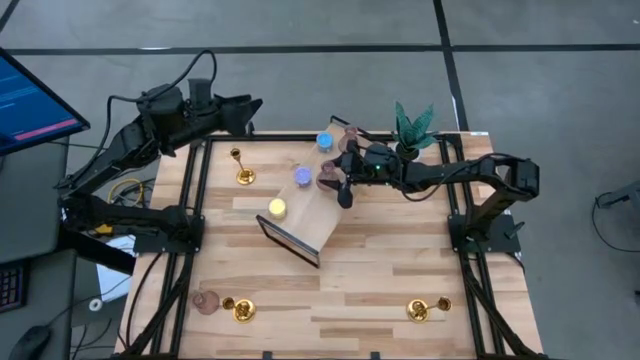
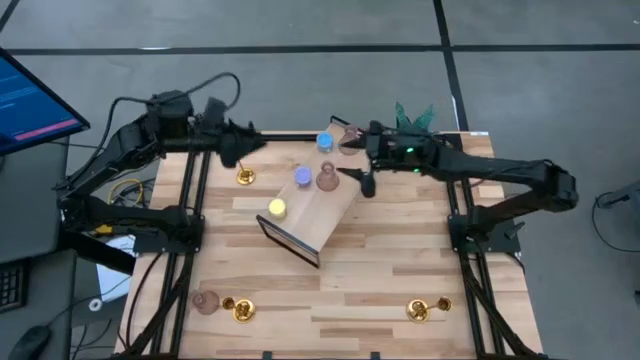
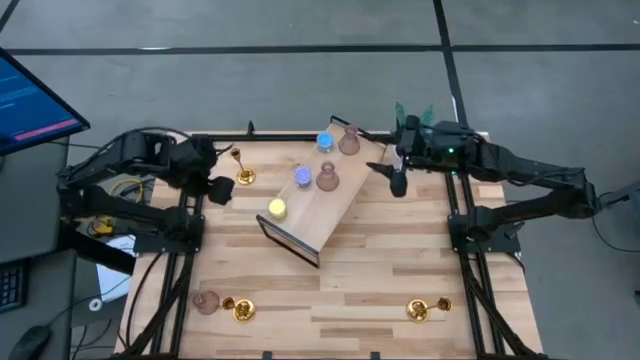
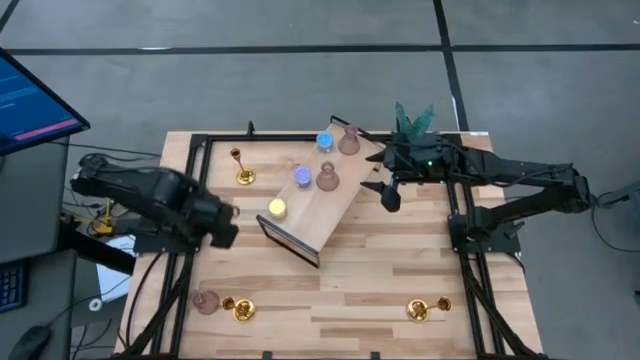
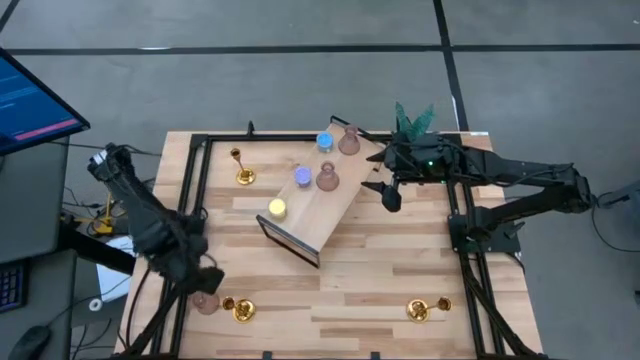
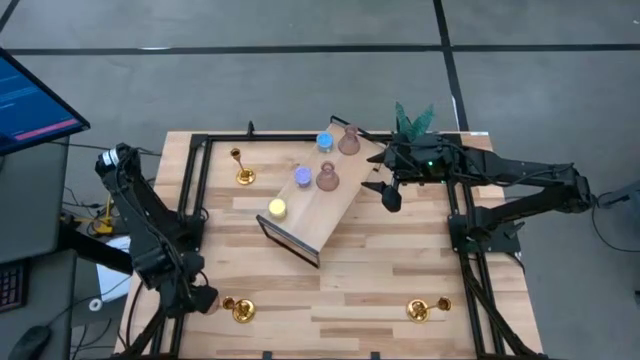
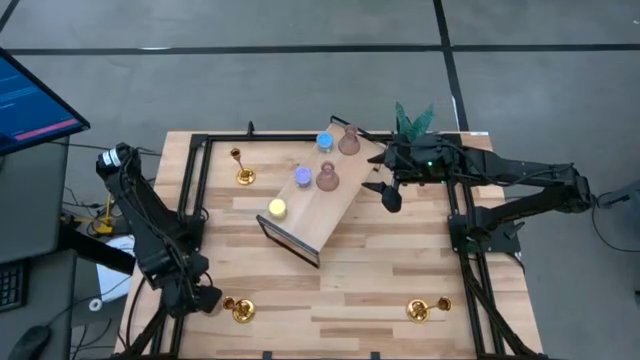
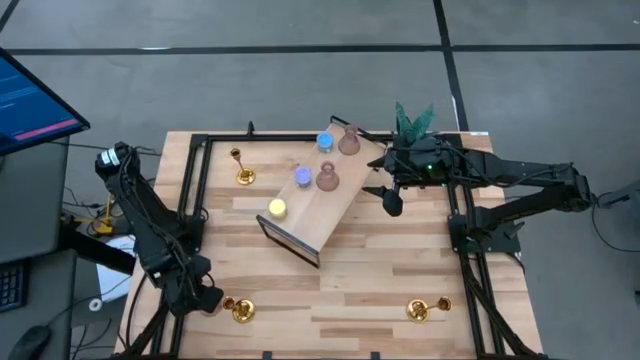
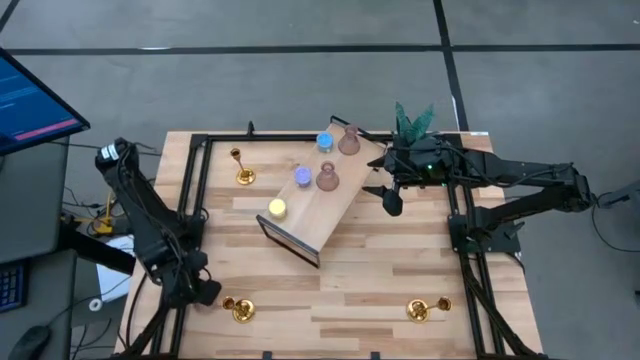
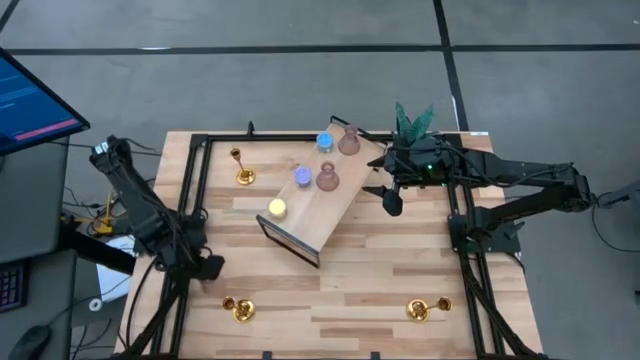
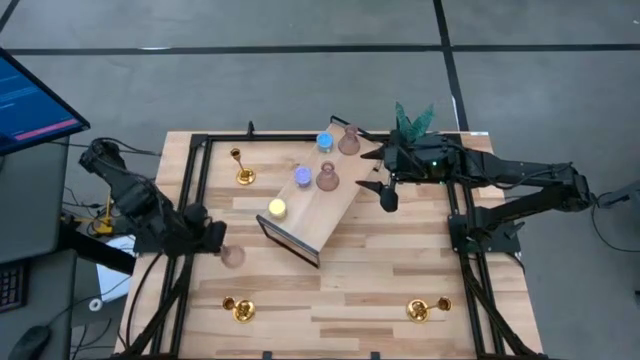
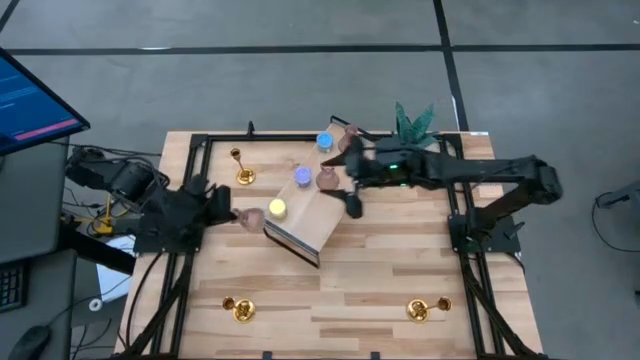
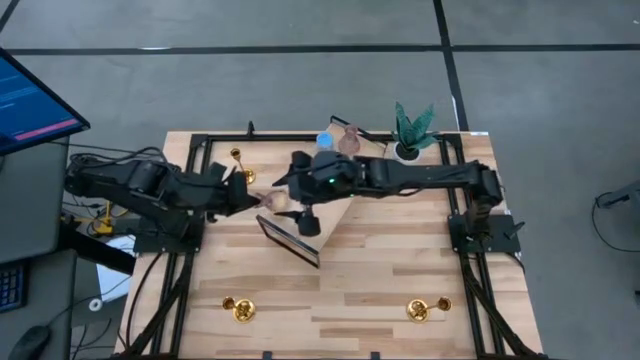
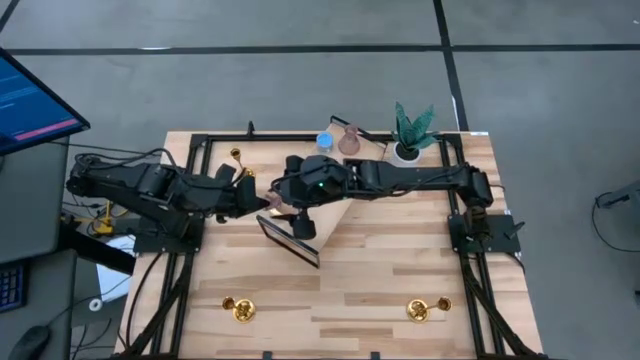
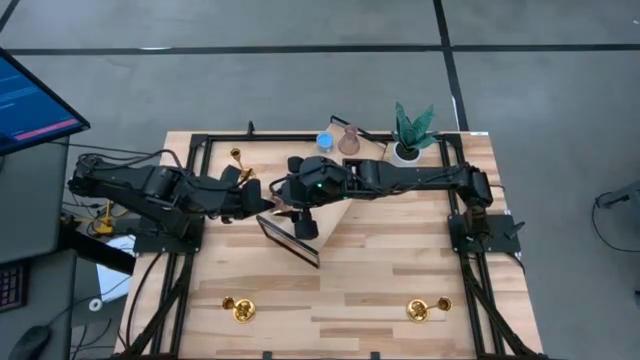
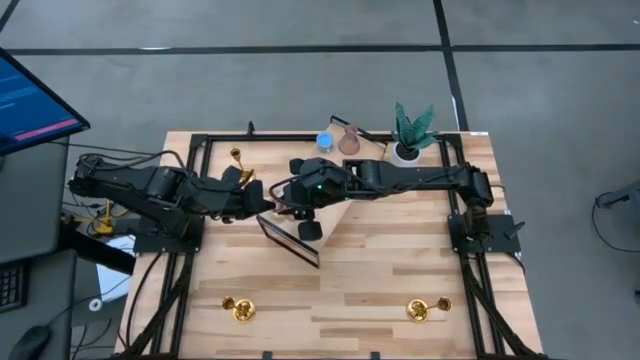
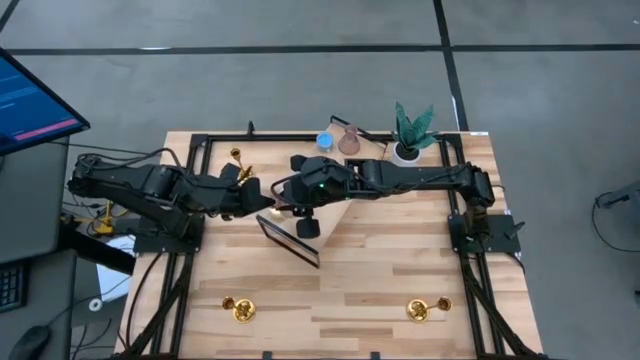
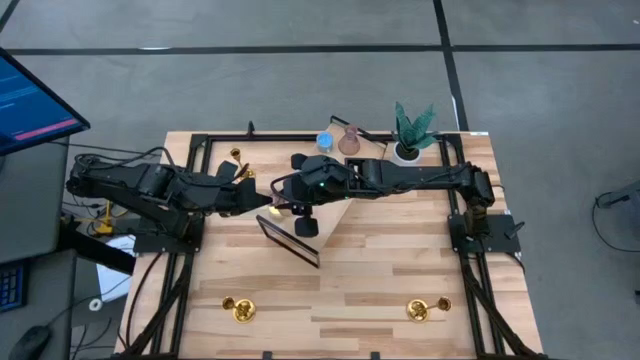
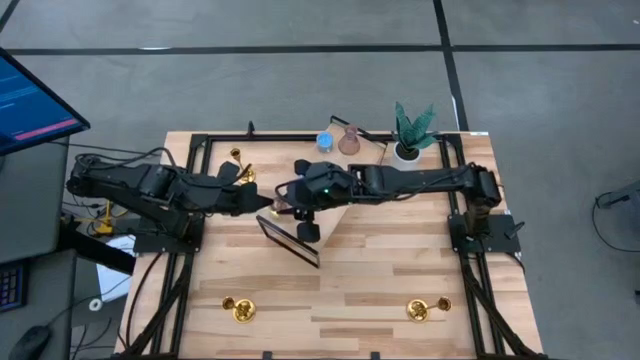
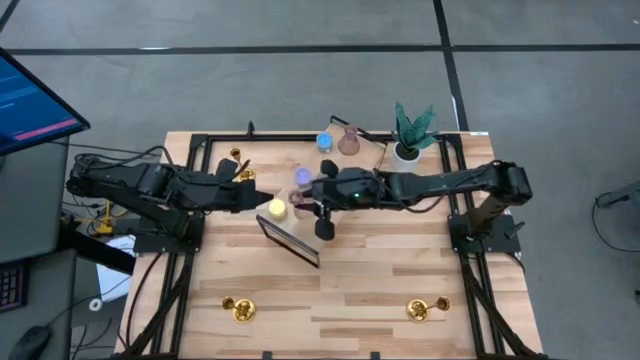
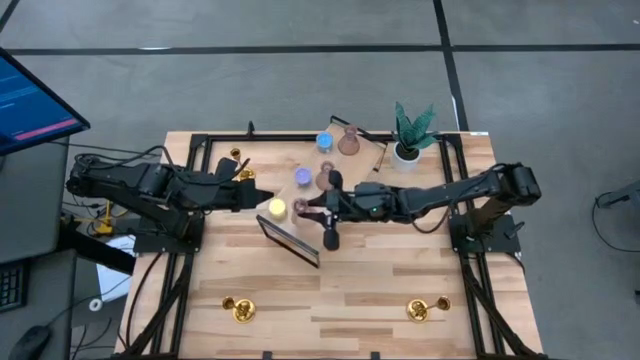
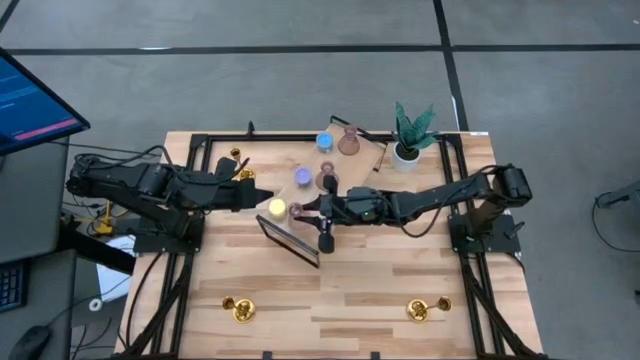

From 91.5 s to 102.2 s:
Task: Pick & Place candle stick holders
Put the glass candle holder on the shelf

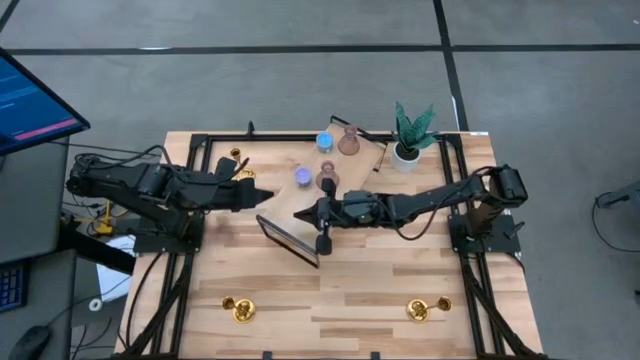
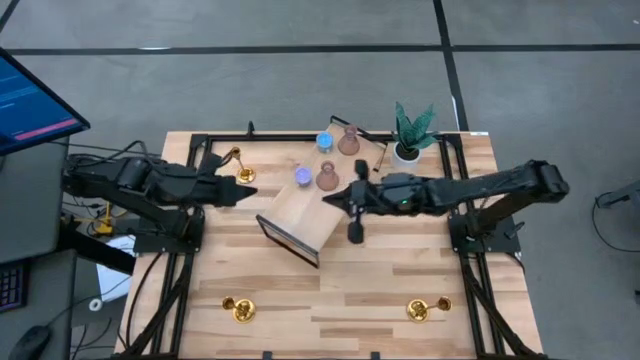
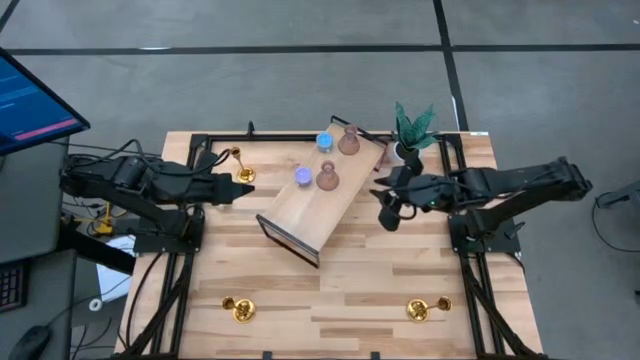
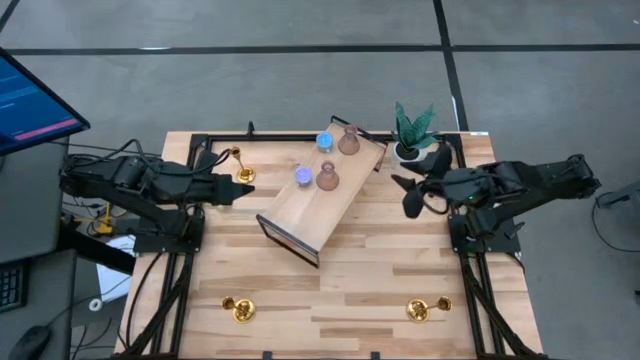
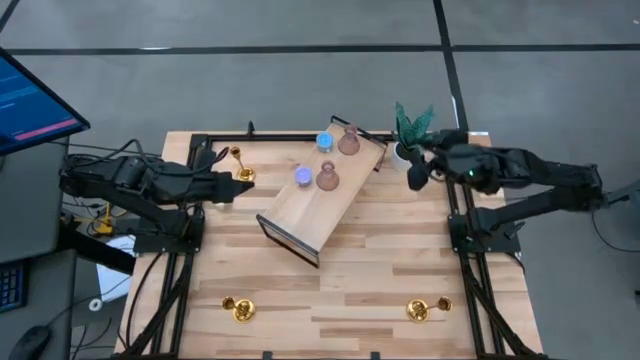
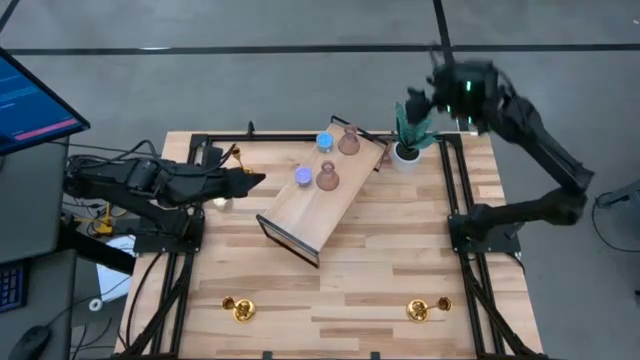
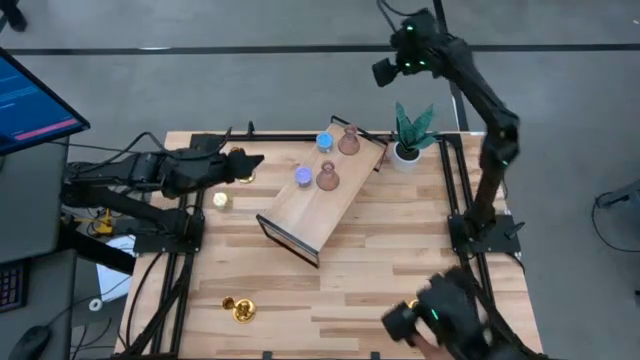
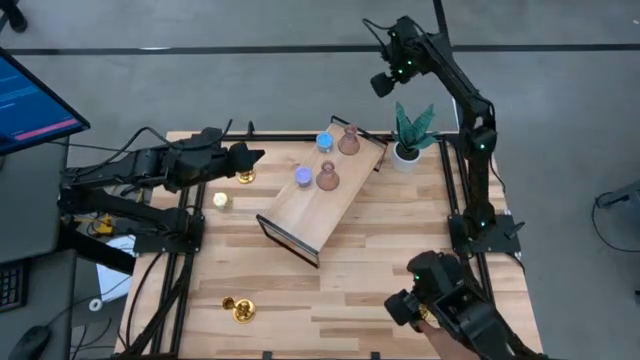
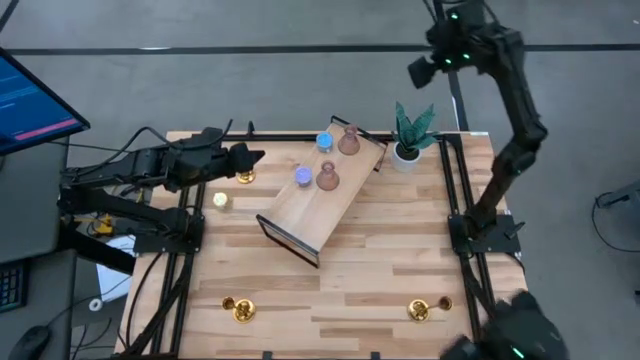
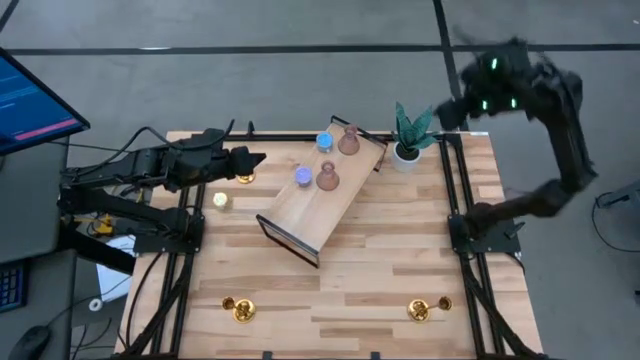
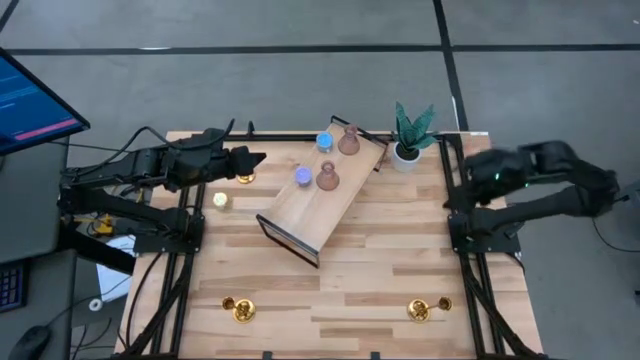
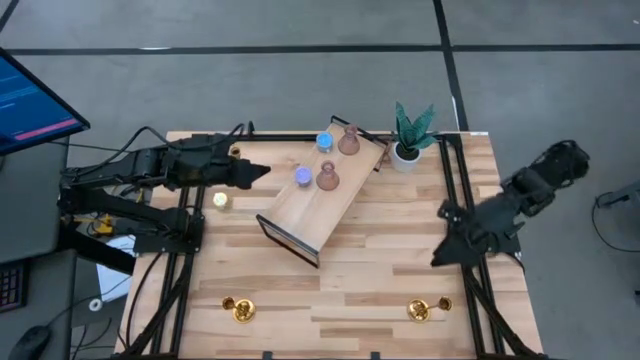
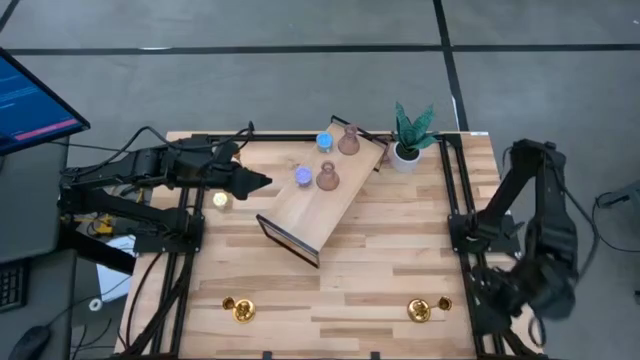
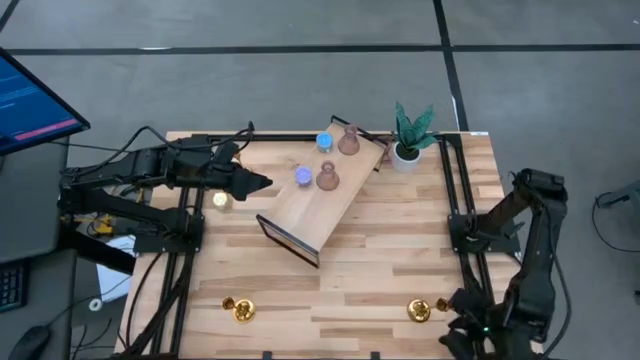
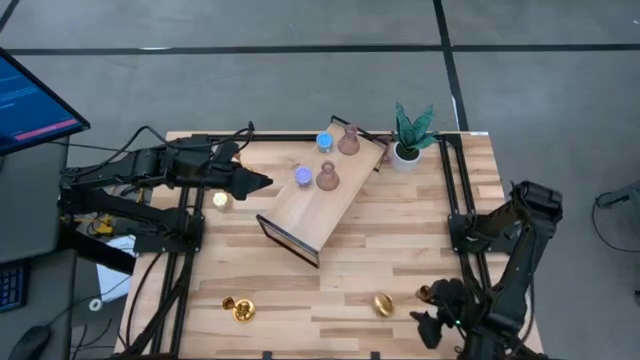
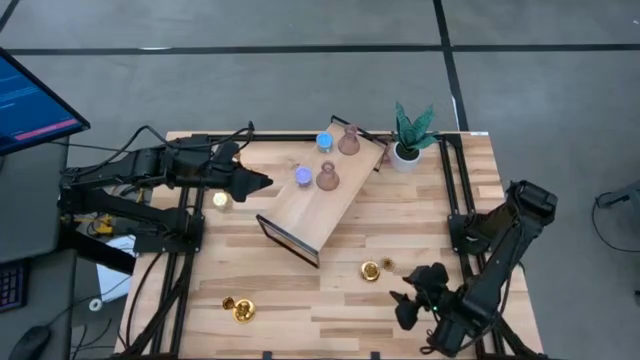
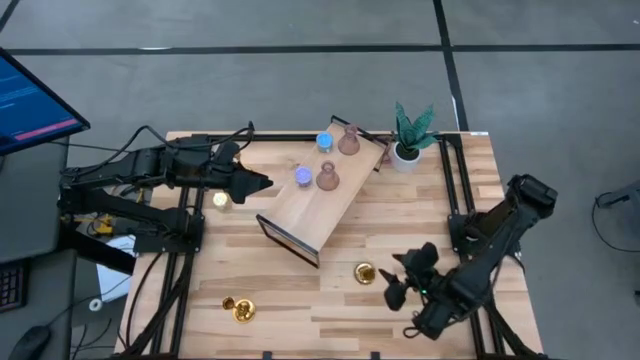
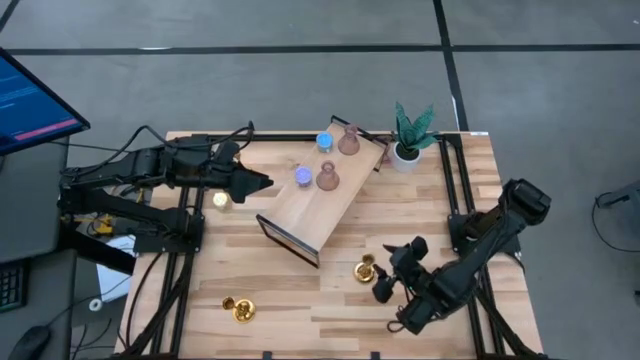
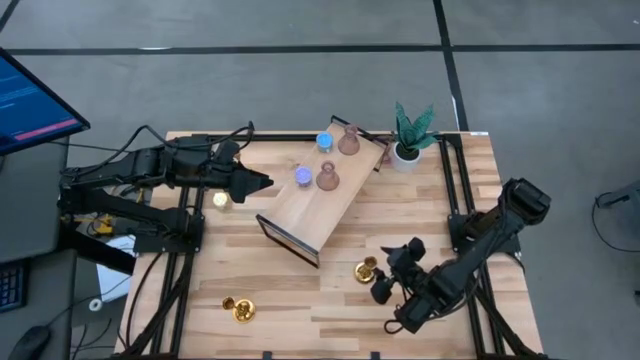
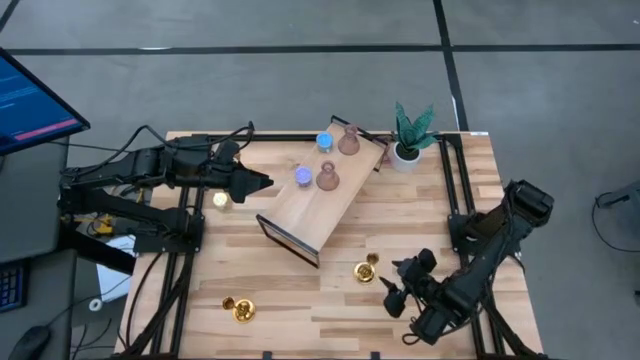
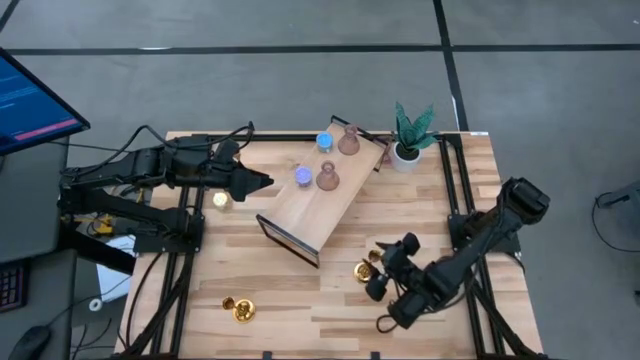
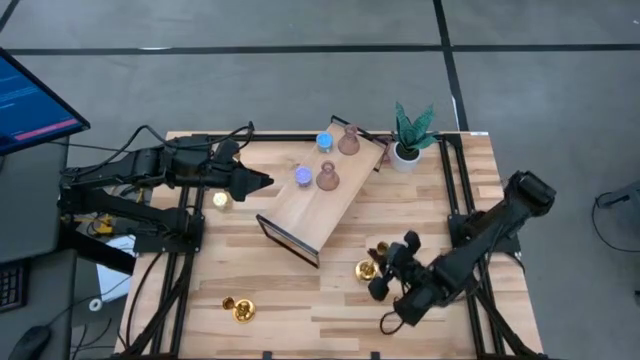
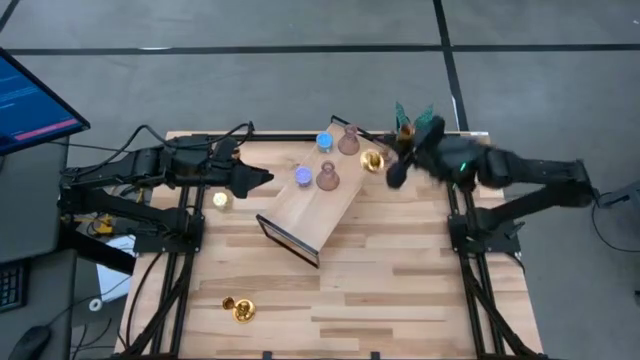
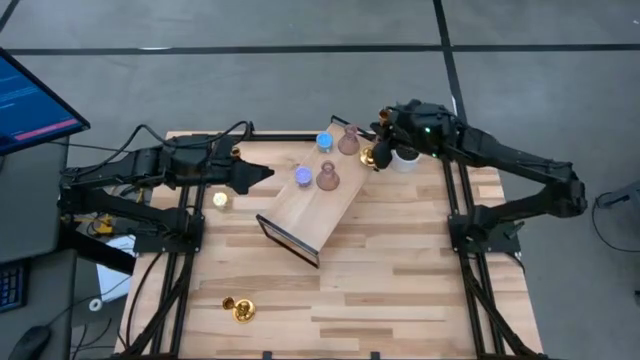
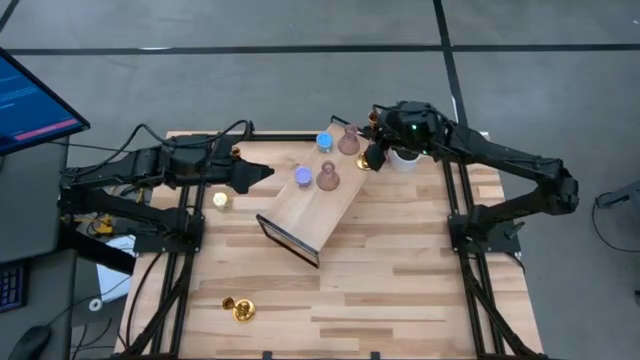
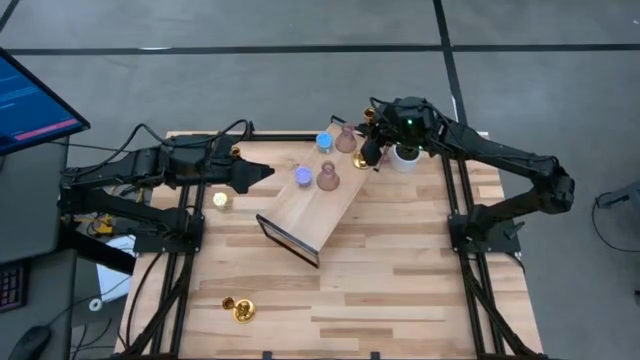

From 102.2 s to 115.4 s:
Put the bottom right candle holder on the shelf
